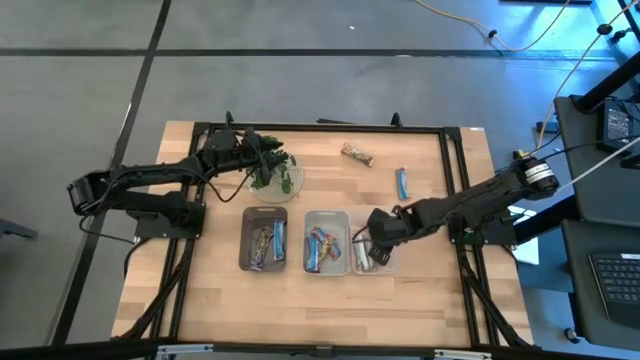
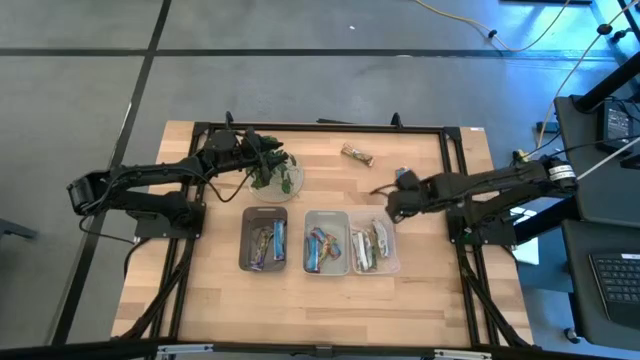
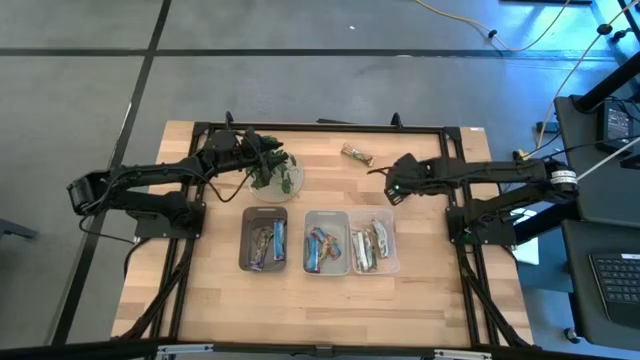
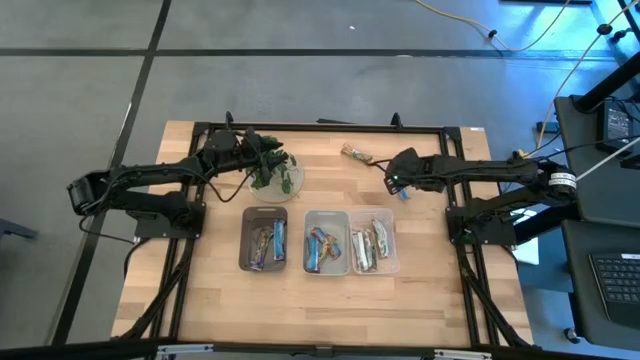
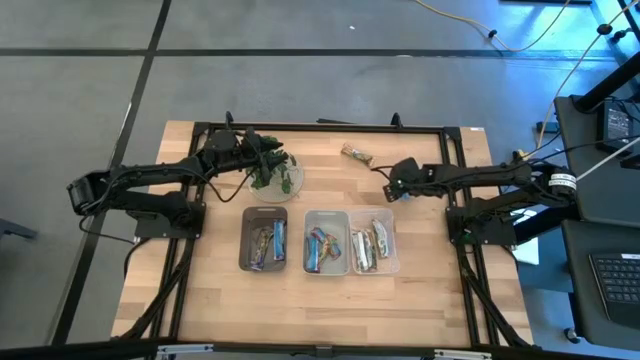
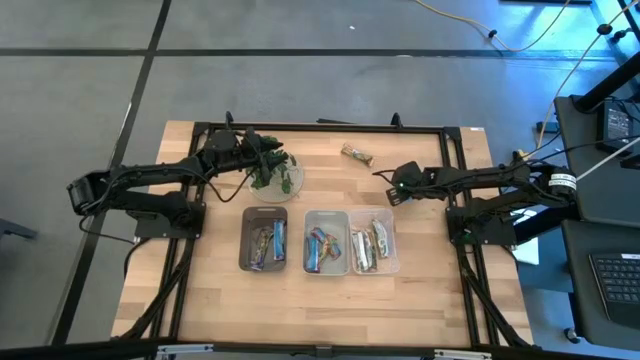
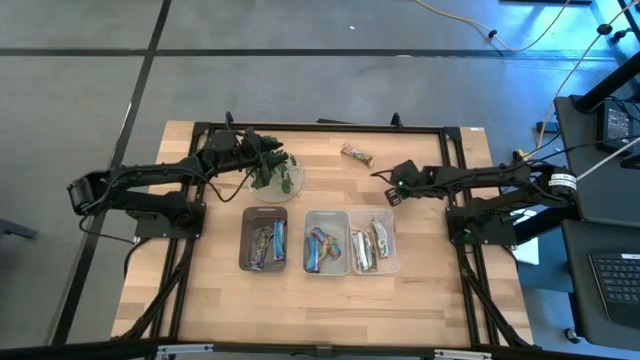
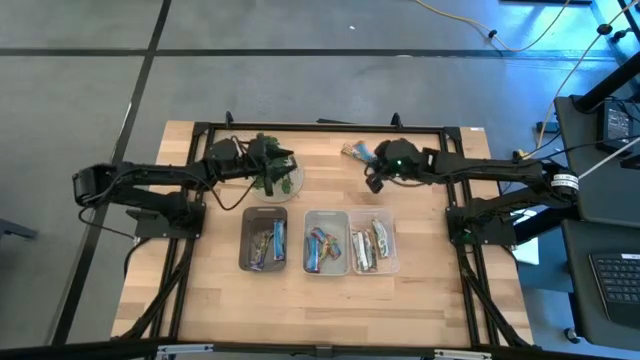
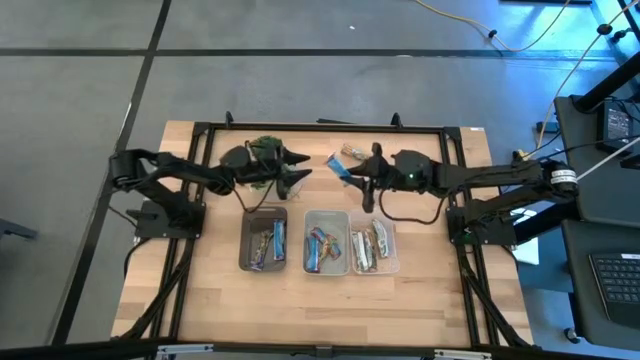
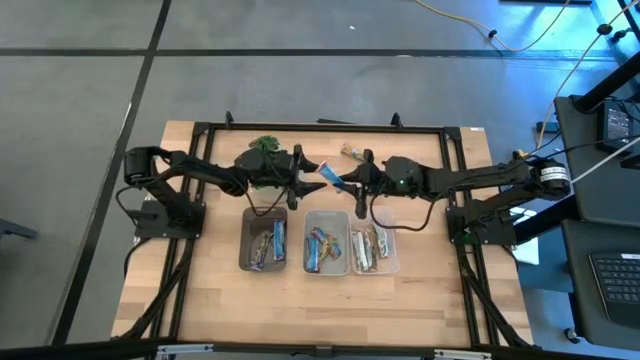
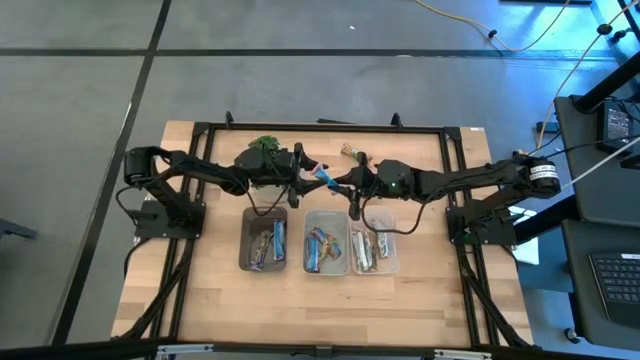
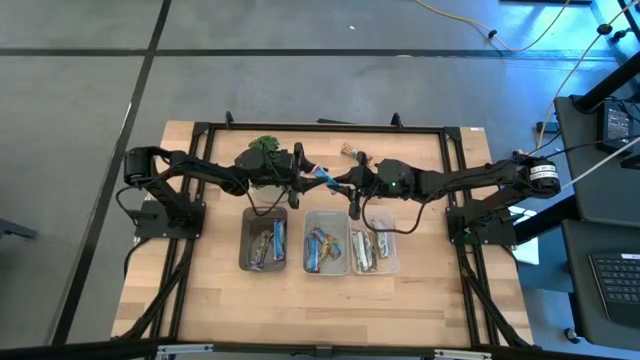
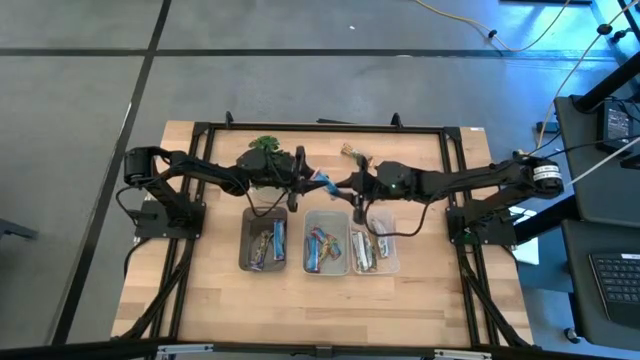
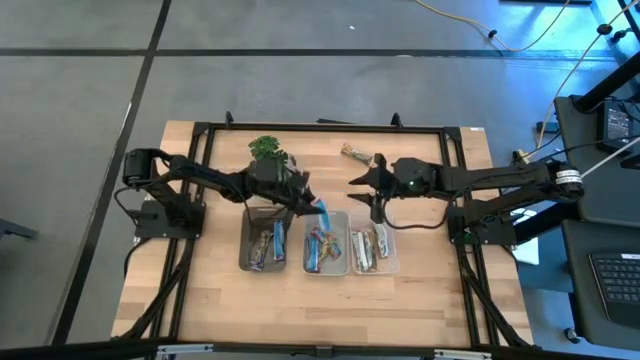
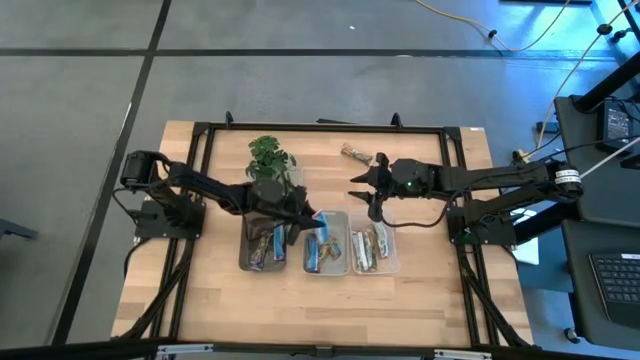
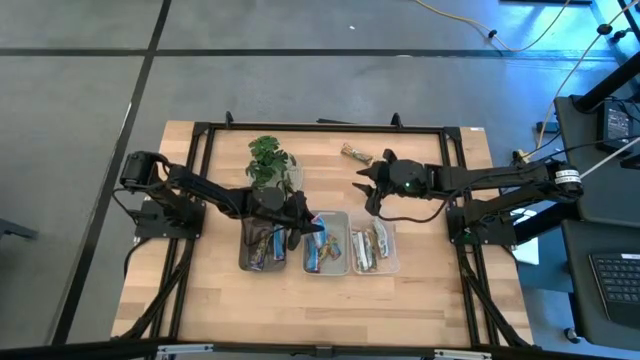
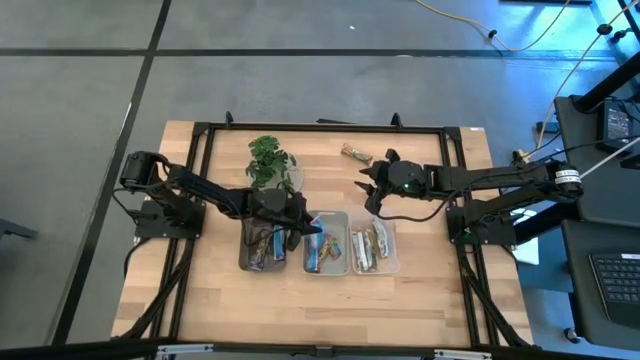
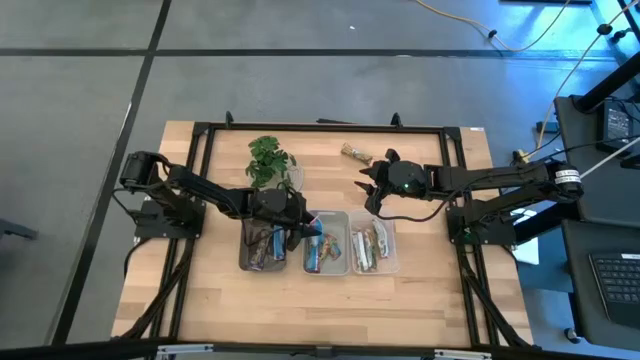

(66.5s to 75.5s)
Task: Pick and place Granola Bars by type
Put the red granola bar into the grey bin

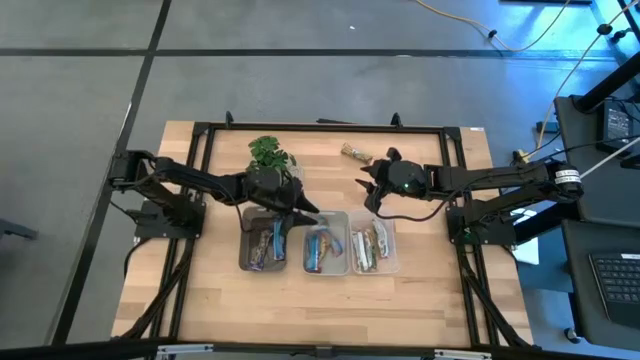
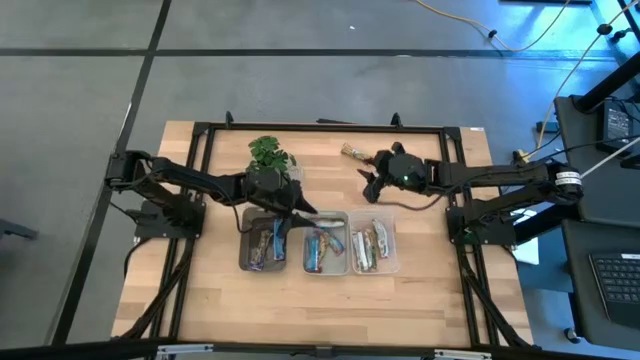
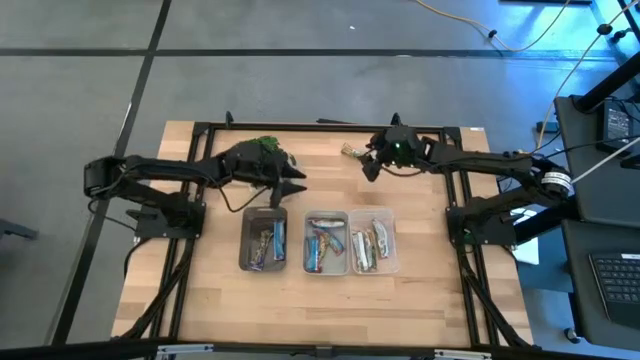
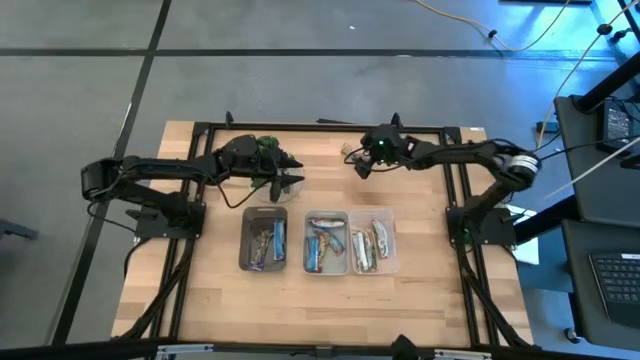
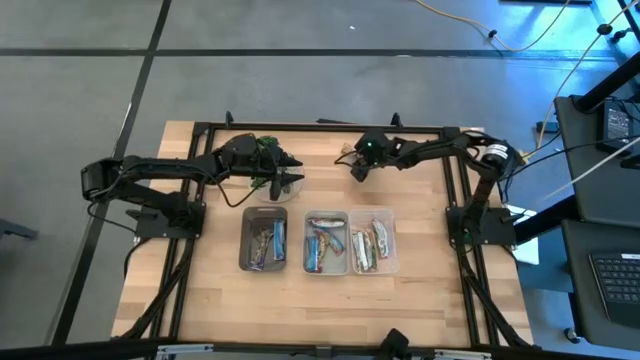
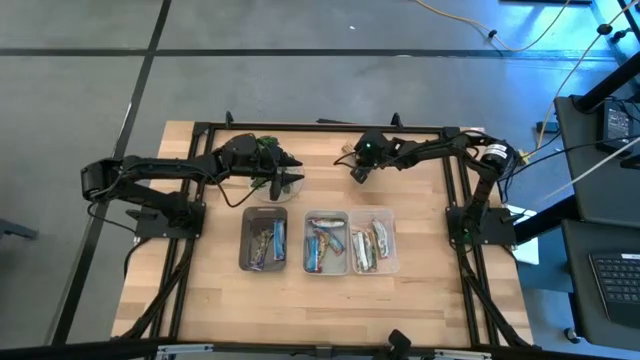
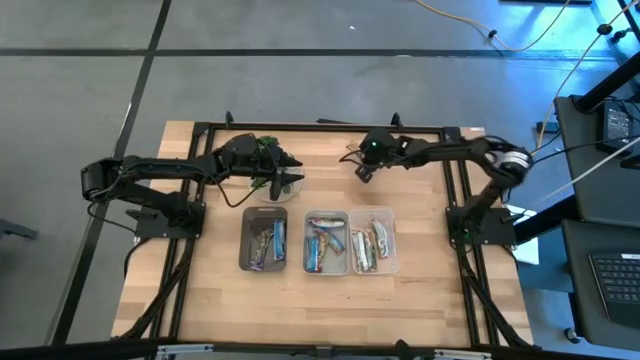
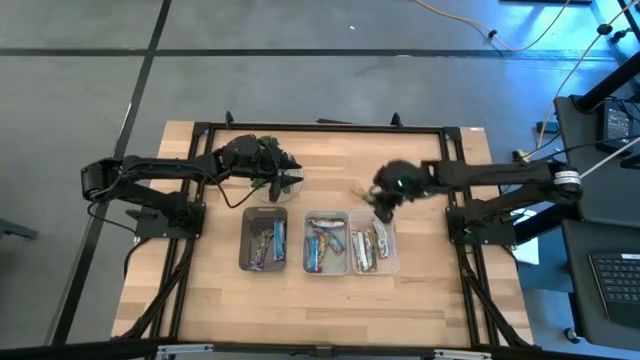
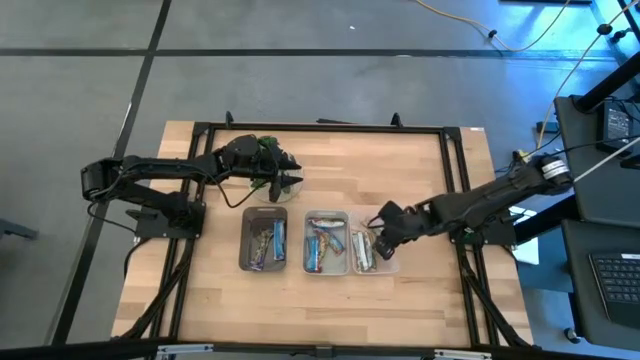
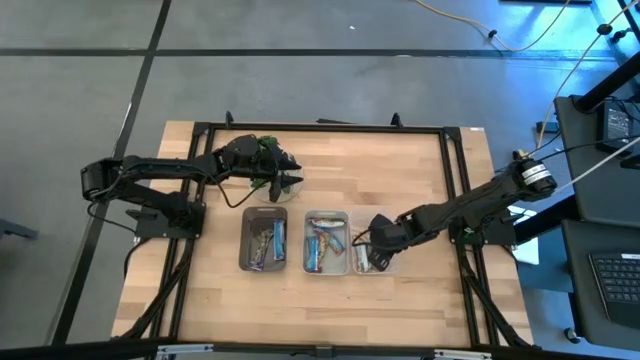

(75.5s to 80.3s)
Put the granola bar into the transparent bin

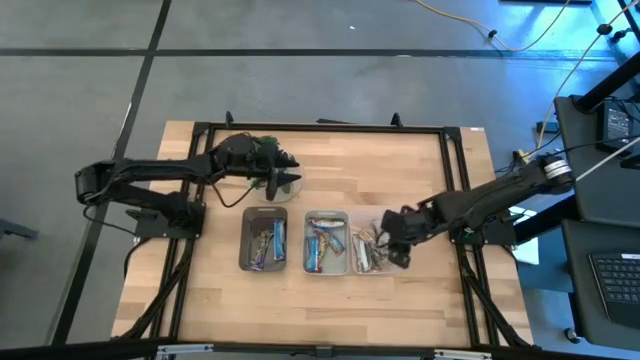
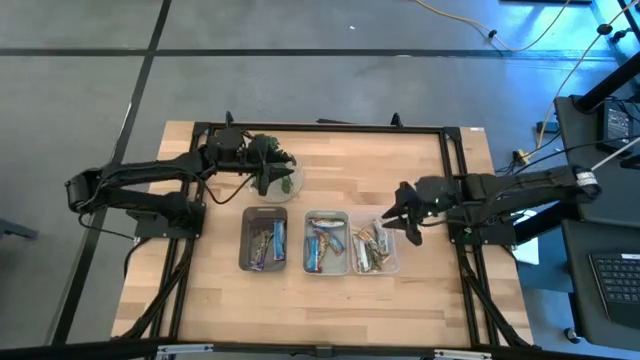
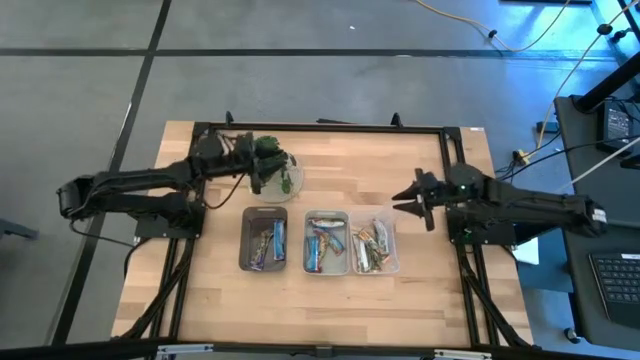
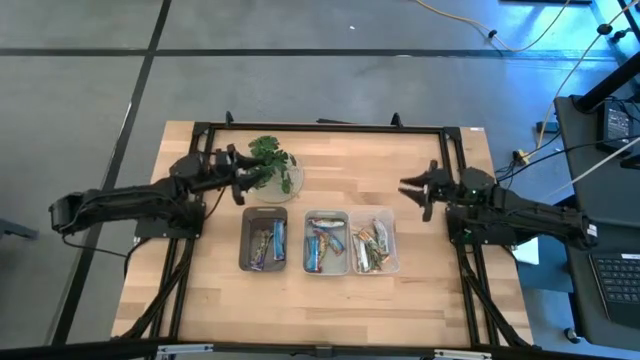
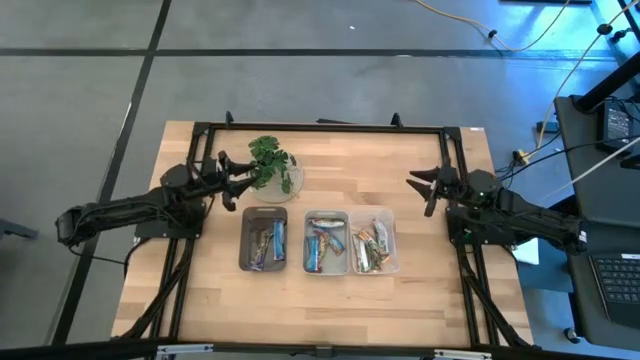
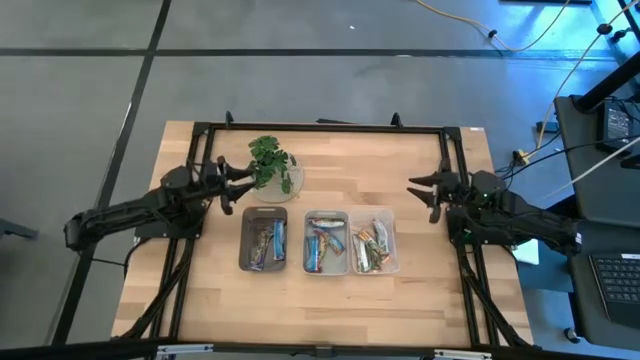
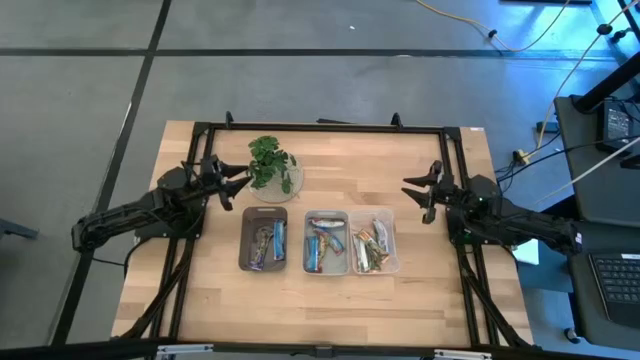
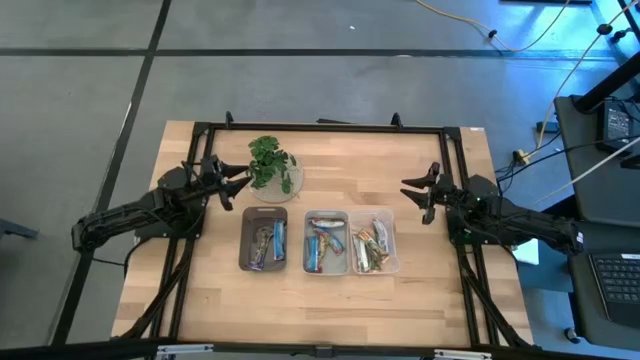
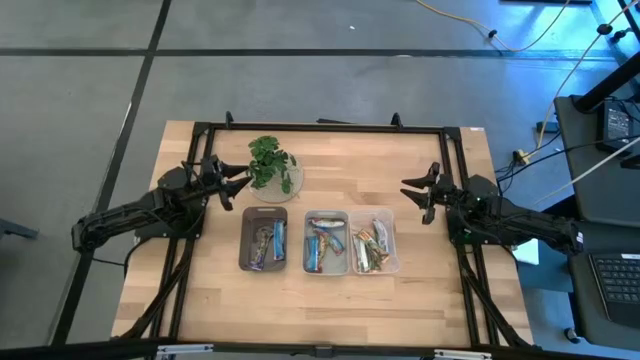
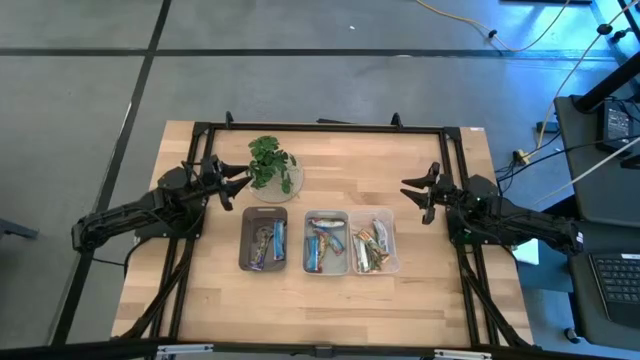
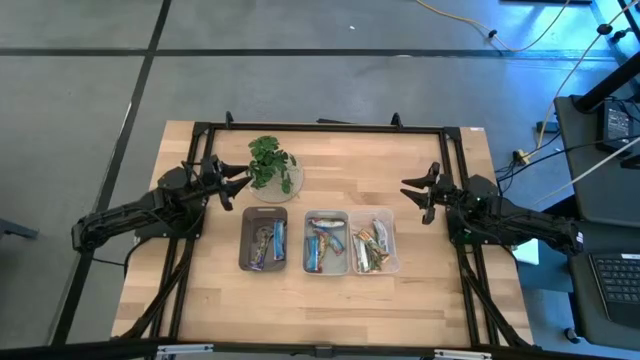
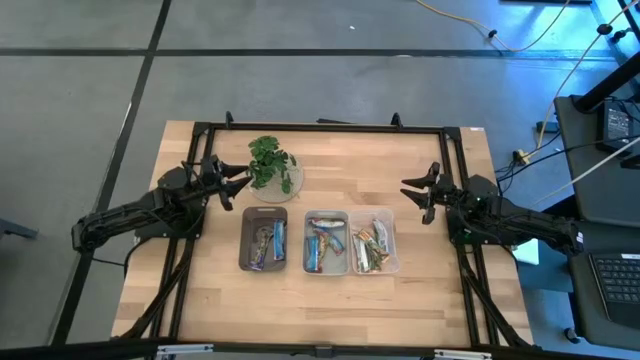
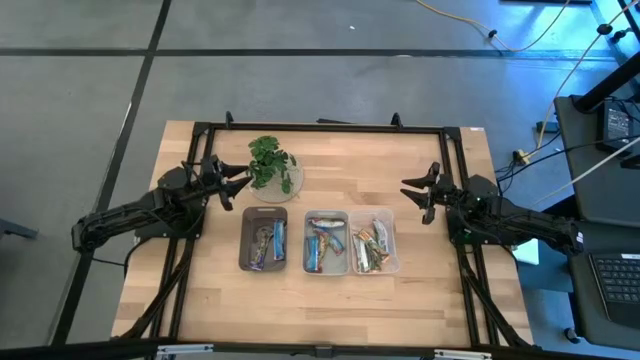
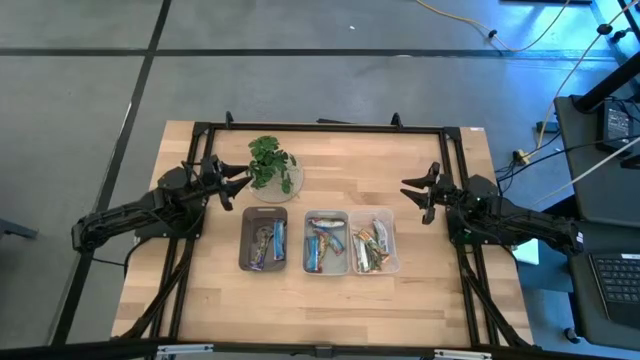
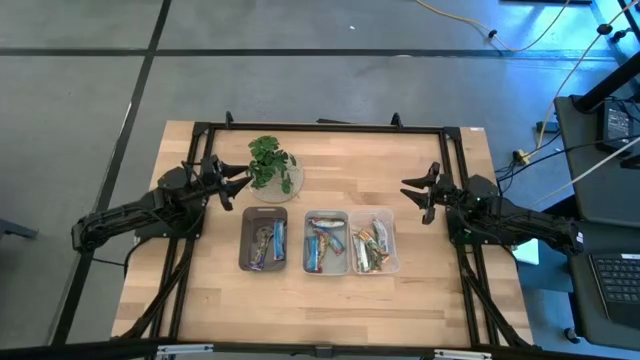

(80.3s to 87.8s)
Return to Home Position
